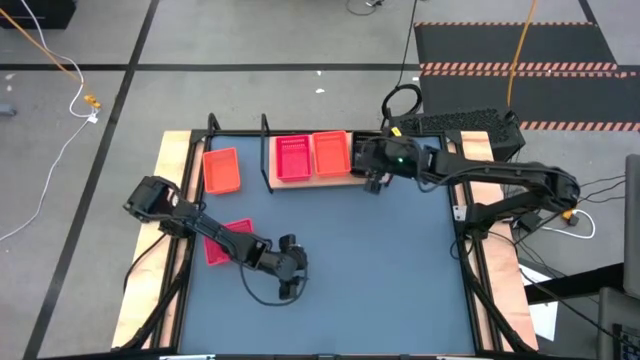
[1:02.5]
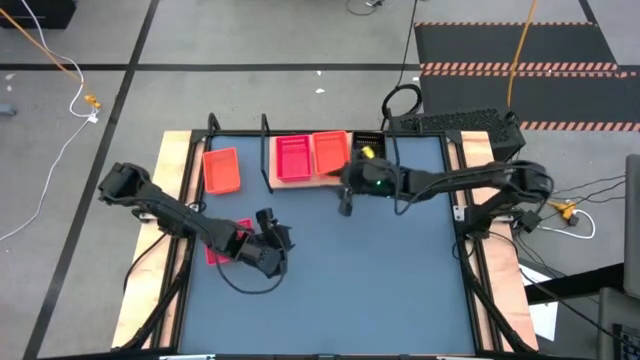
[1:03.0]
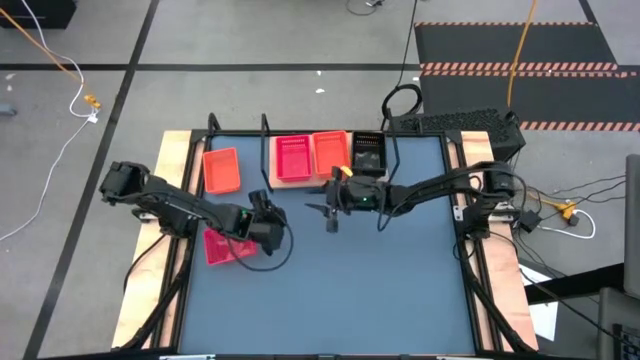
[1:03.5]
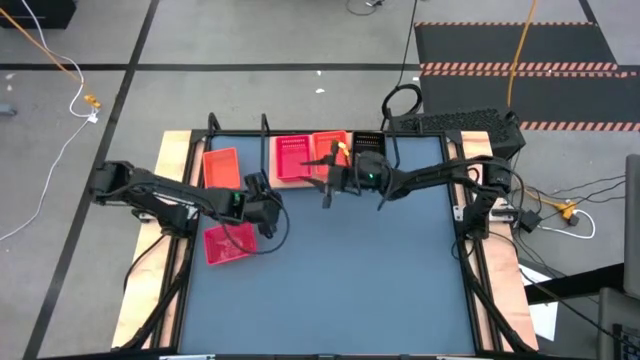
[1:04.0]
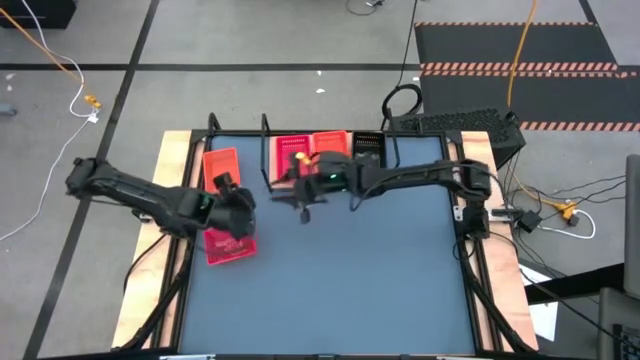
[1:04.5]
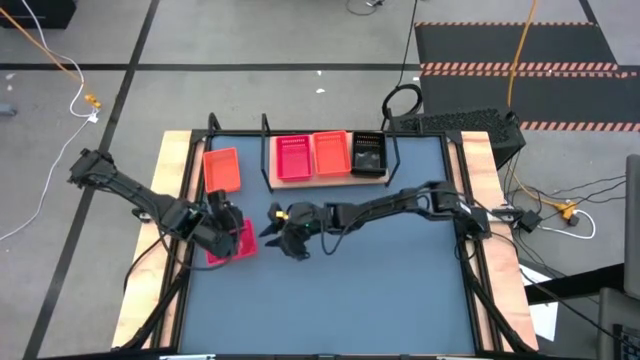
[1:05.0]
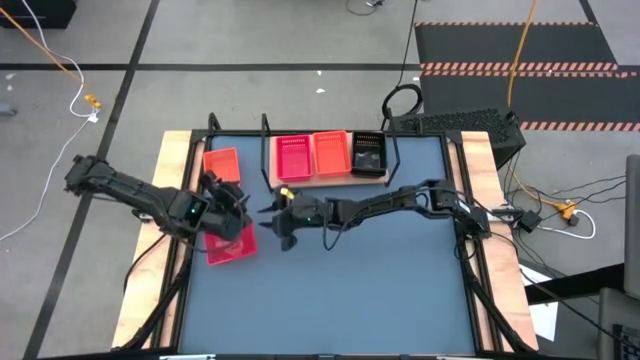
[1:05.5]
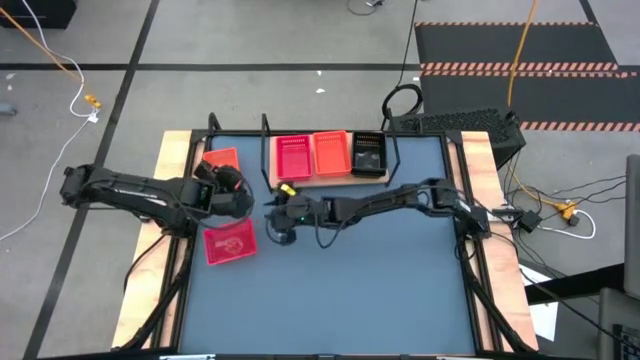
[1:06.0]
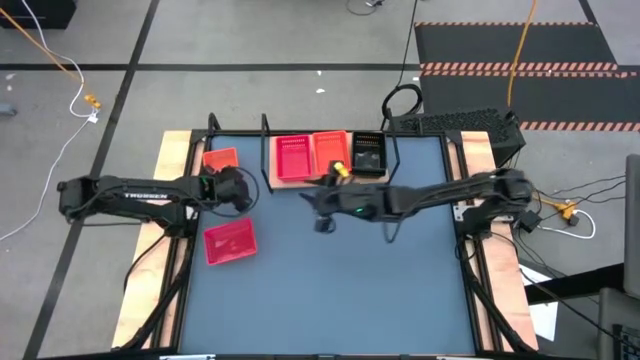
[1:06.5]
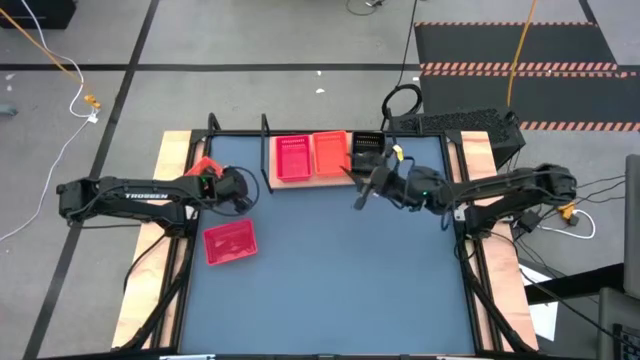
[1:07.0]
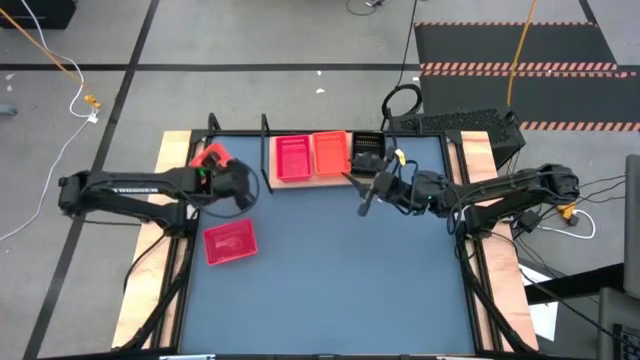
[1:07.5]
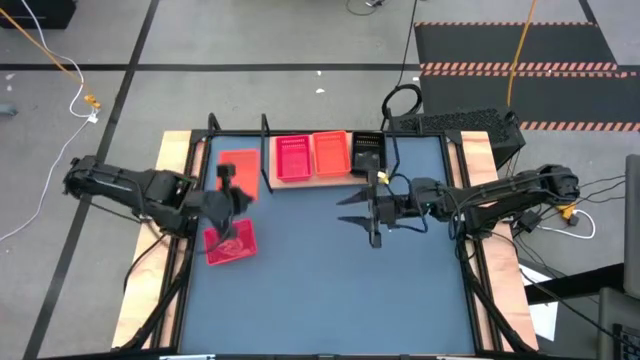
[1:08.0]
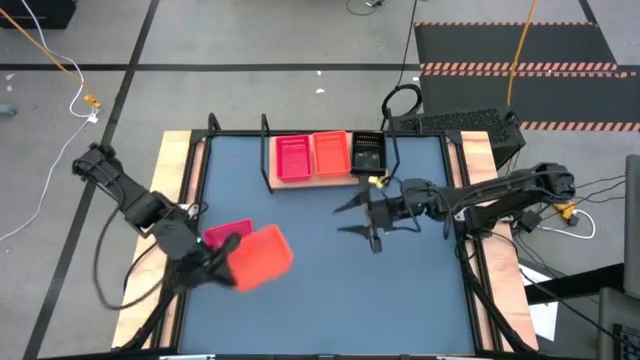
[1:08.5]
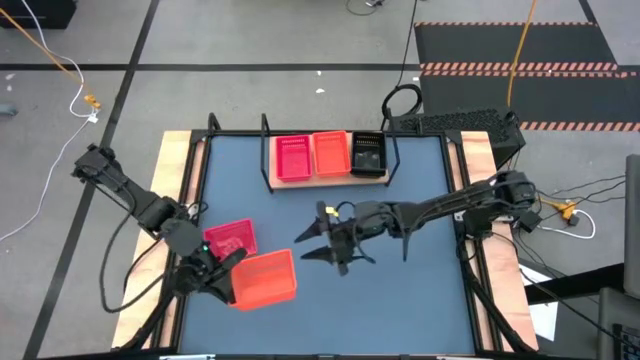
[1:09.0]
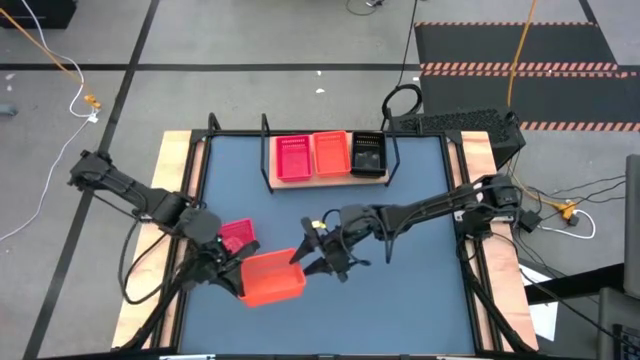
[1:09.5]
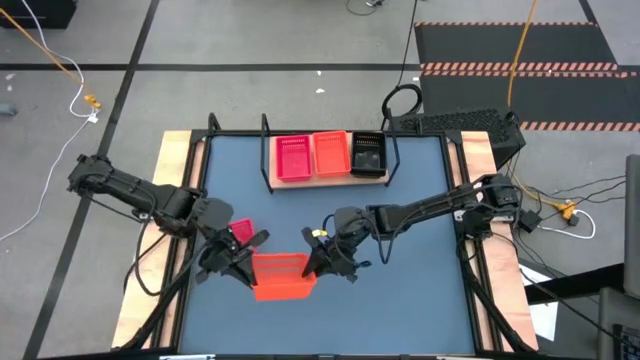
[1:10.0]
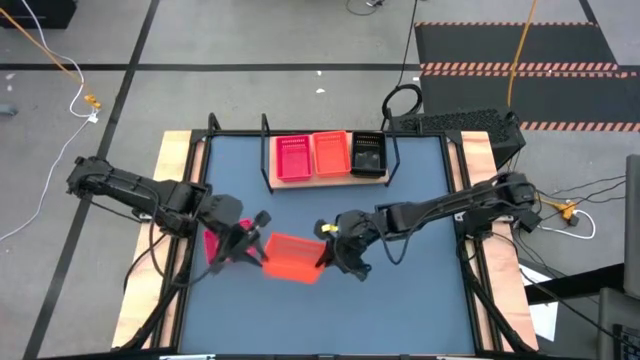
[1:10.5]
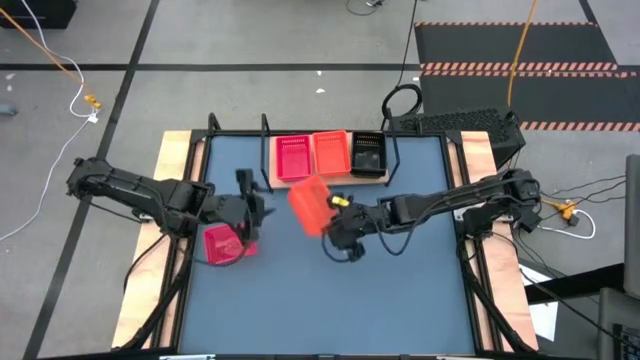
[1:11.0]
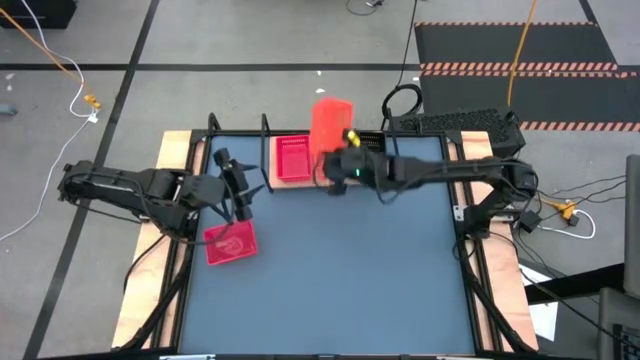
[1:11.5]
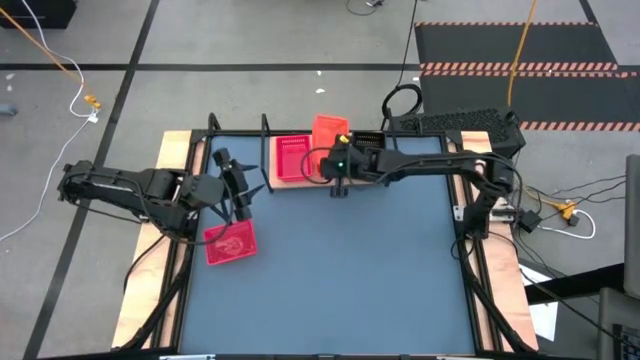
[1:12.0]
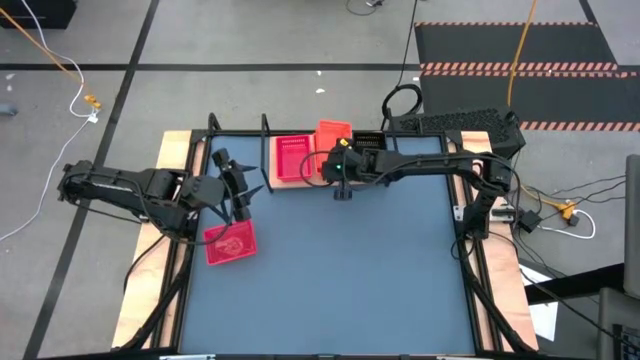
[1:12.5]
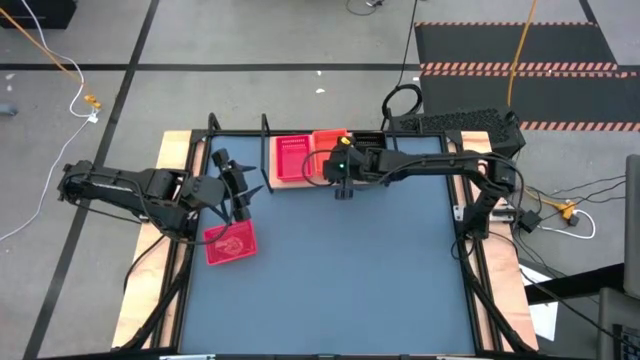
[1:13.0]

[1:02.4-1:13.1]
Task: Stack baskets on shelf by color
Stack the orange basket on top of the orange basket on the shelf

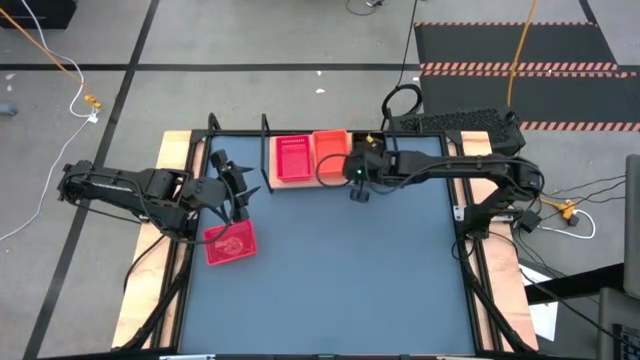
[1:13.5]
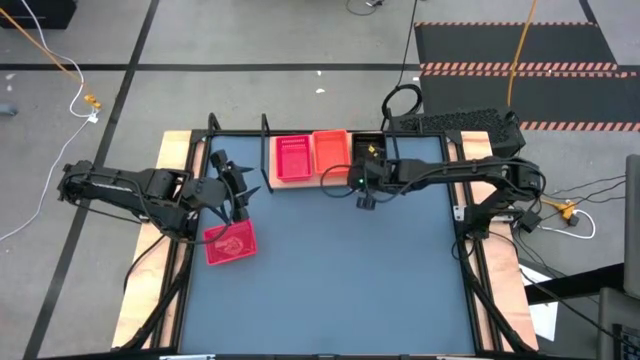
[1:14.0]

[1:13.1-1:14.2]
Adjust the black baskets on the shelf

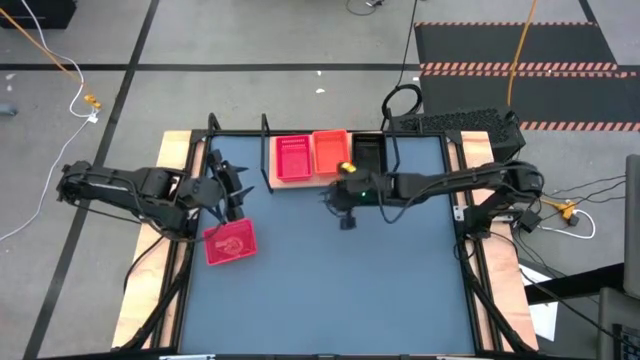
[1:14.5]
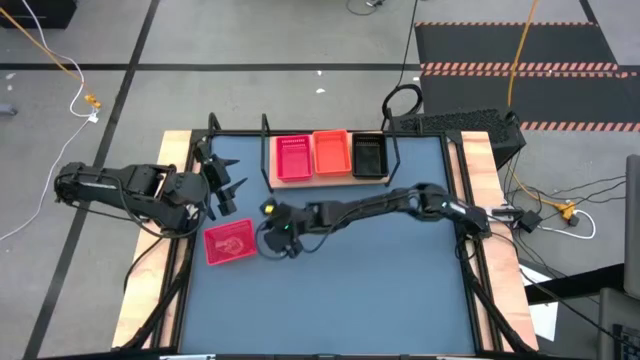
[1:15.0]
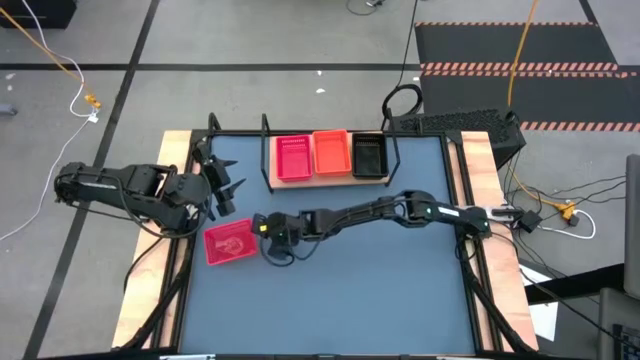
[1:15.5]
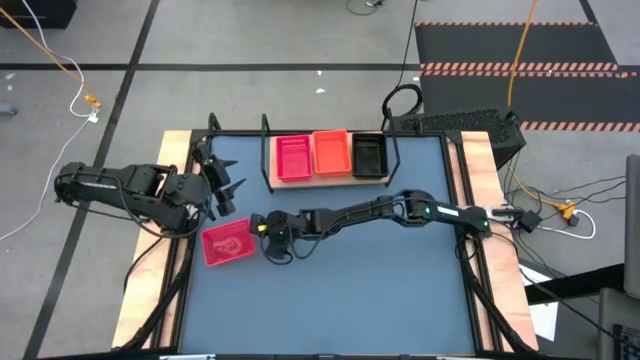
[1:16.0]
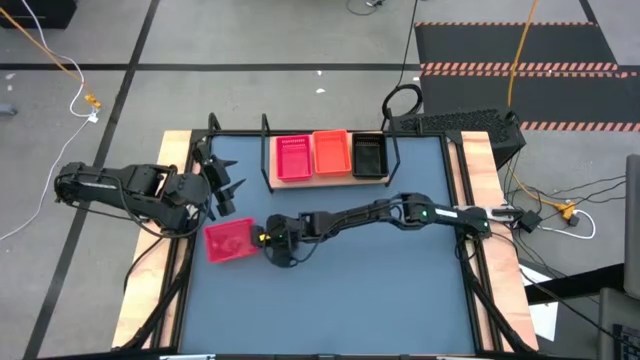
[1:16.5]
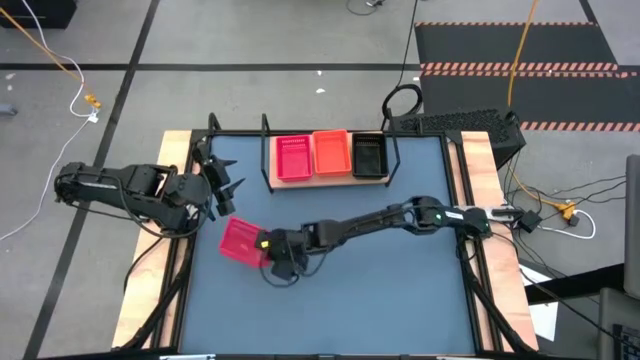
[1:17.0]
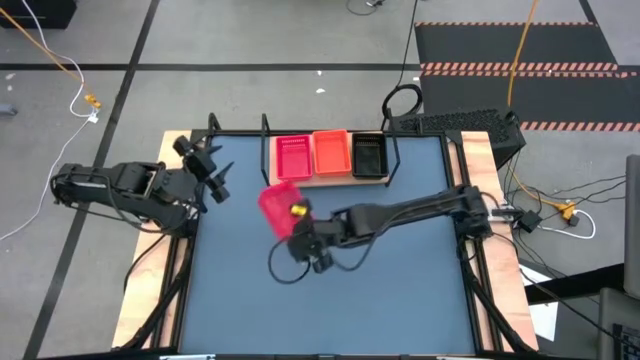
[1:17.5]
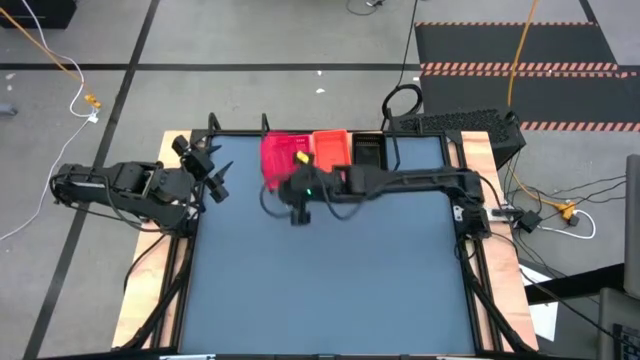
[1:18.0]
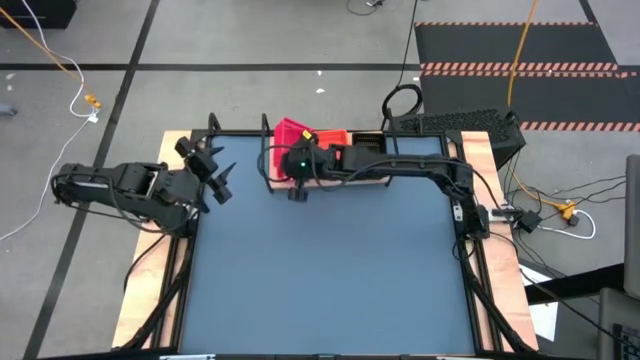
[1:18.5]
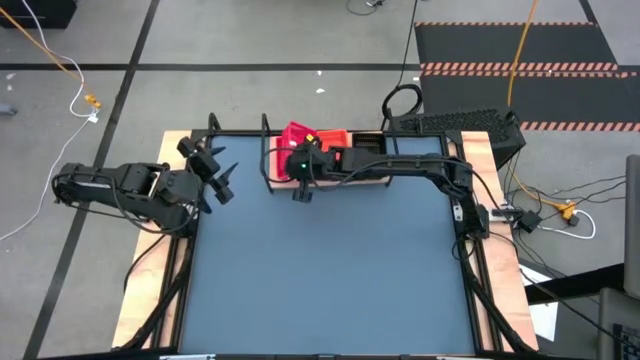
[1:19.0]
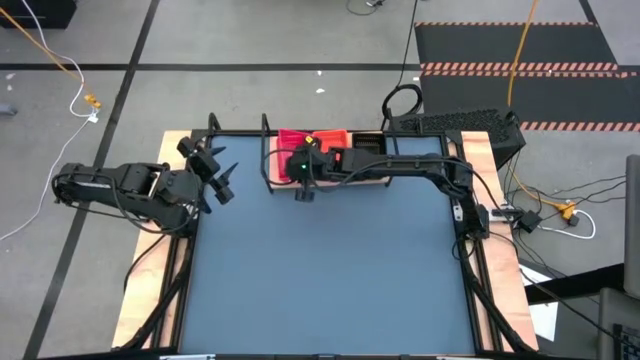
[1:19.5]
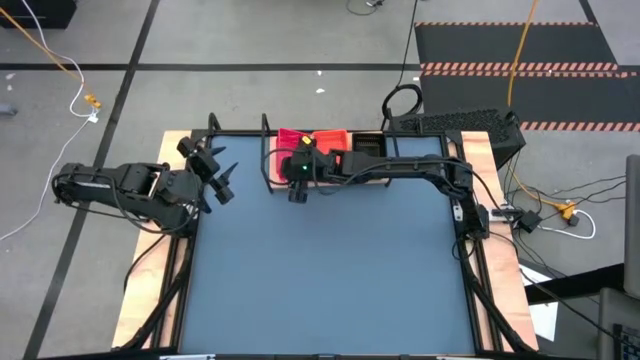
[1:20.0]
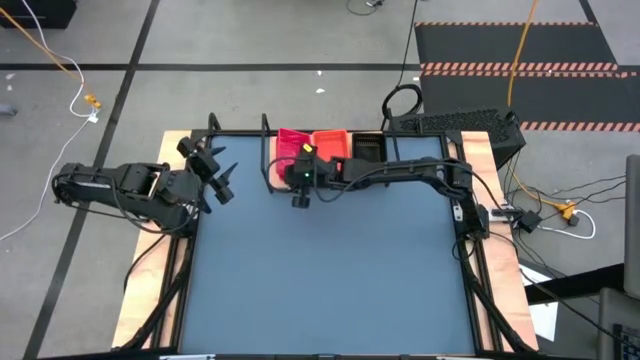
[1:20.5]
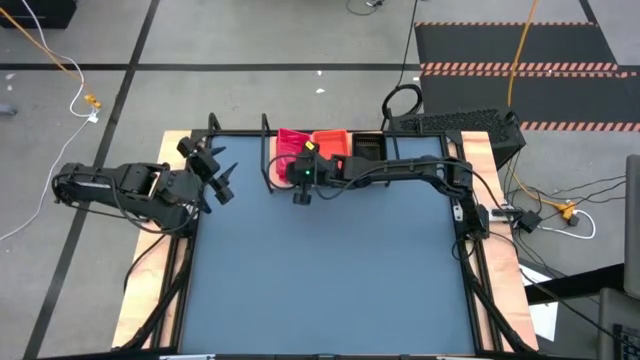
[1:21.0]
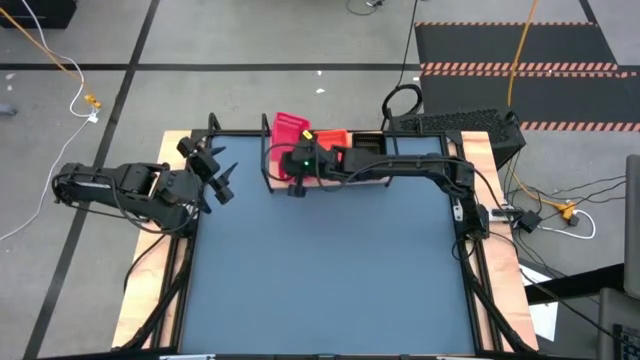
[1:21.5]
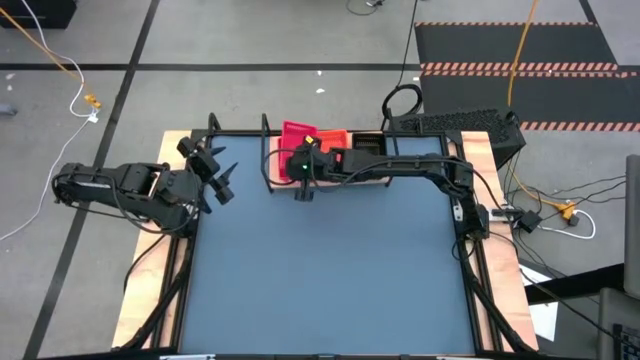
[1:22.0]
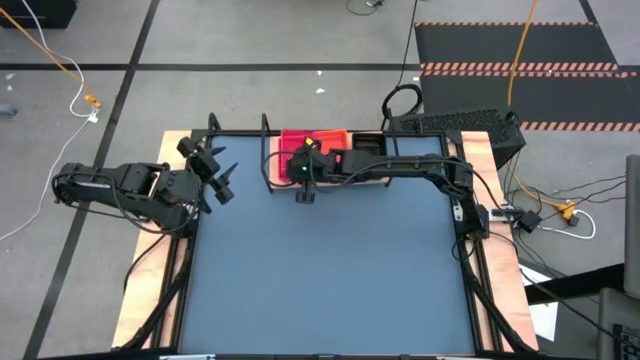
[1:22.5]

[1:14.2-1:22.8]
Stack the red basket on top of the red basket on the shelf

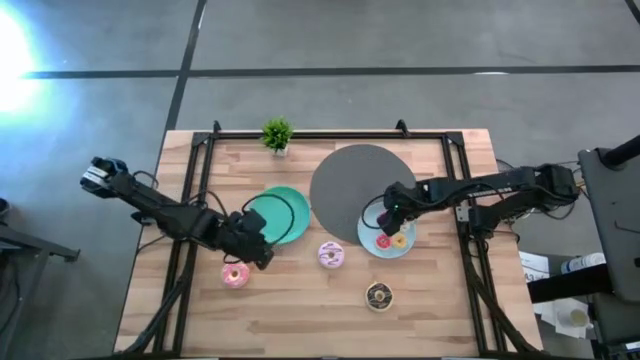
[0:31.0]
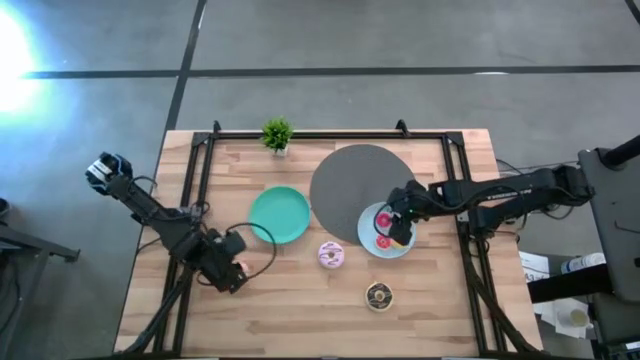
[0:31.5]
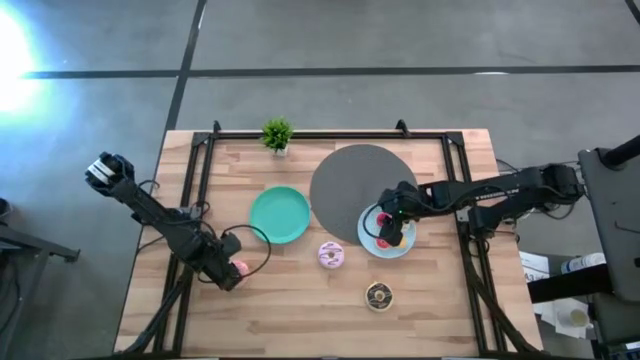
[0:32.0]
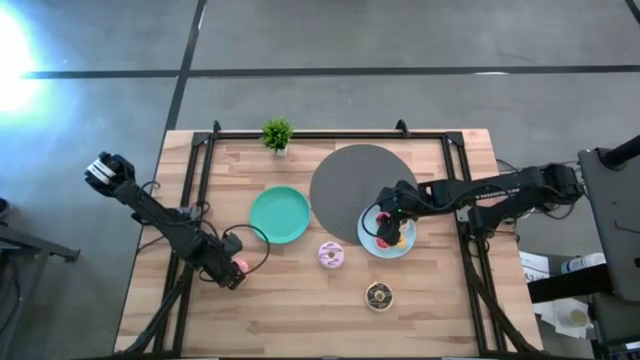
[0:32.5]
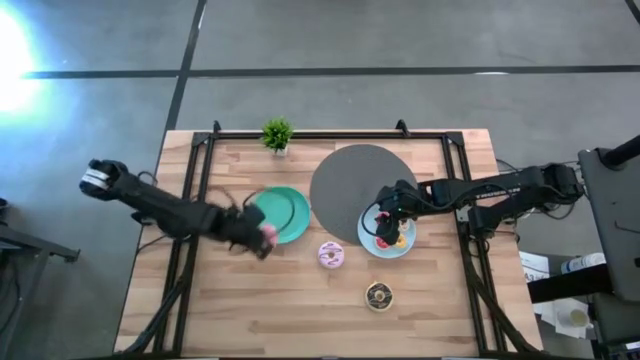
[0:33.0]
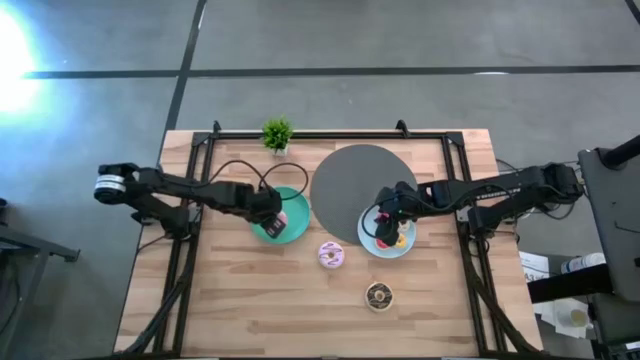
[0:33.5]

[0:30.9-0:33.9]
Task: Pick & Place donuts
Put the large pink donut on the green plate
